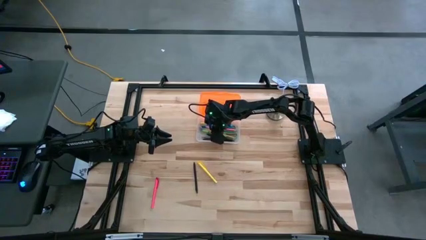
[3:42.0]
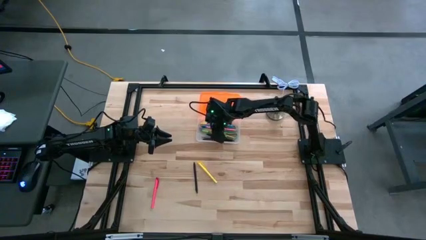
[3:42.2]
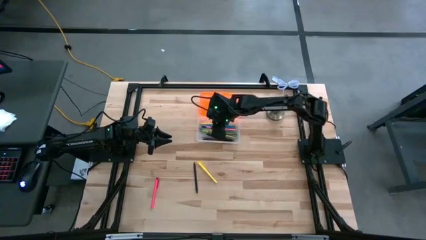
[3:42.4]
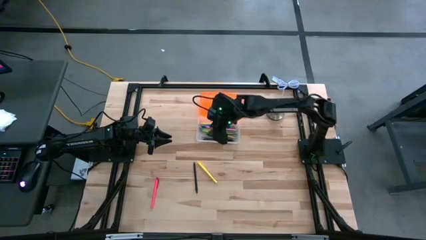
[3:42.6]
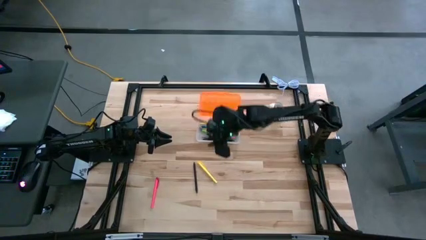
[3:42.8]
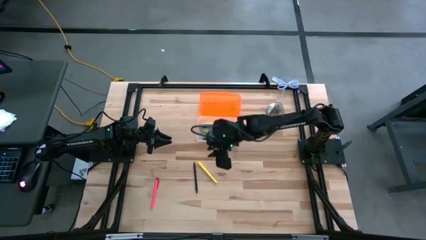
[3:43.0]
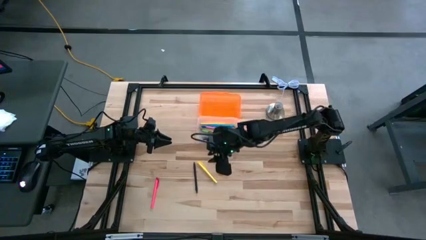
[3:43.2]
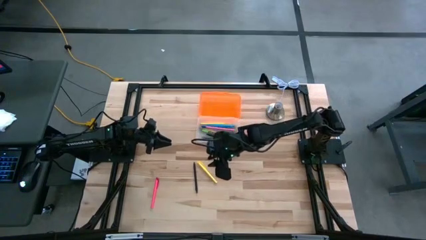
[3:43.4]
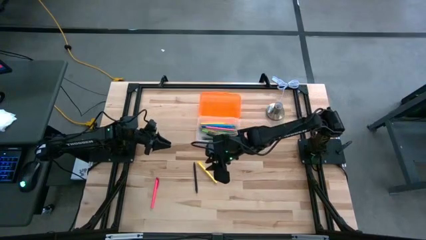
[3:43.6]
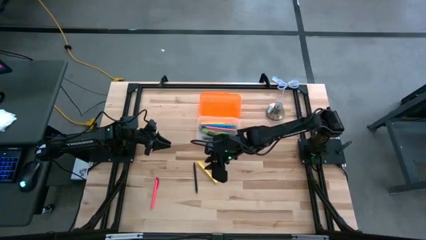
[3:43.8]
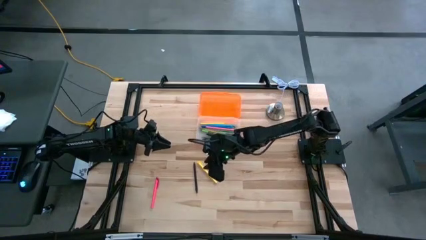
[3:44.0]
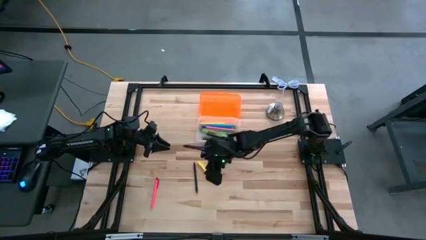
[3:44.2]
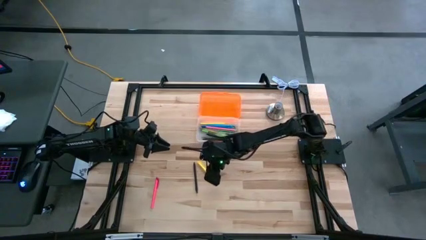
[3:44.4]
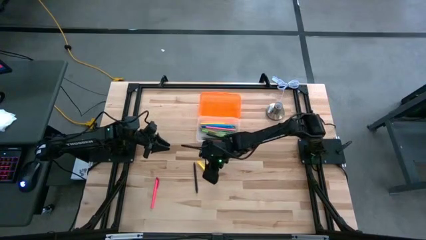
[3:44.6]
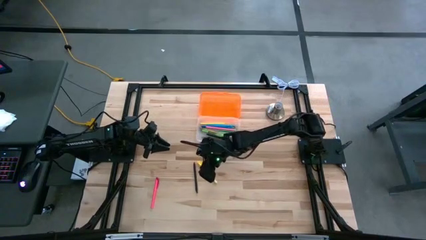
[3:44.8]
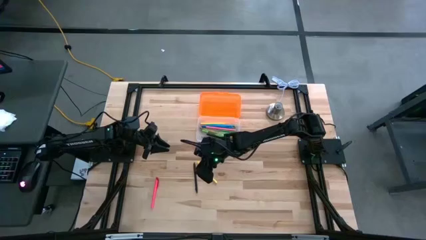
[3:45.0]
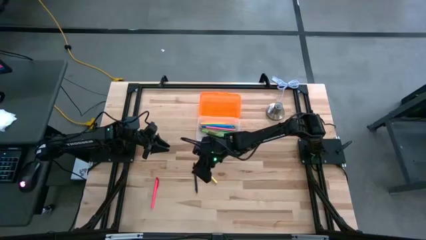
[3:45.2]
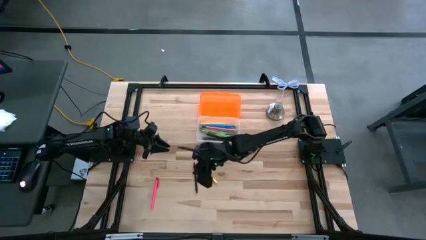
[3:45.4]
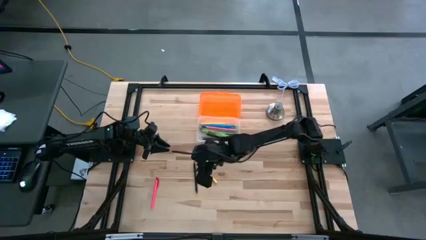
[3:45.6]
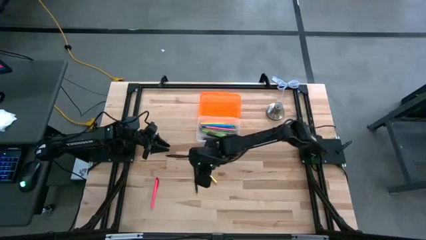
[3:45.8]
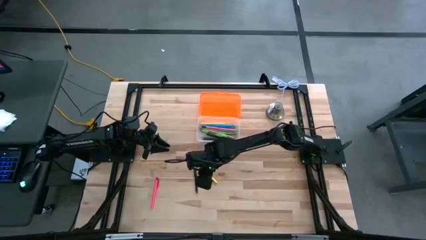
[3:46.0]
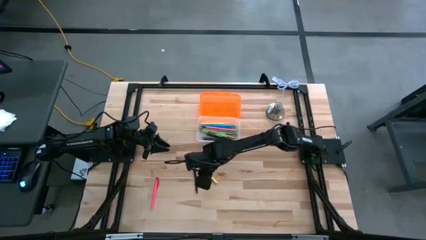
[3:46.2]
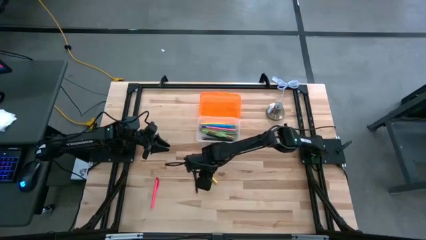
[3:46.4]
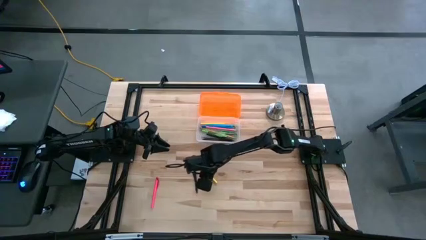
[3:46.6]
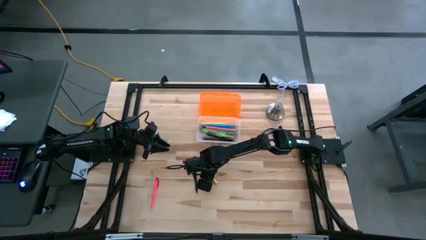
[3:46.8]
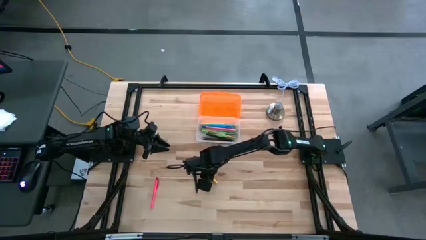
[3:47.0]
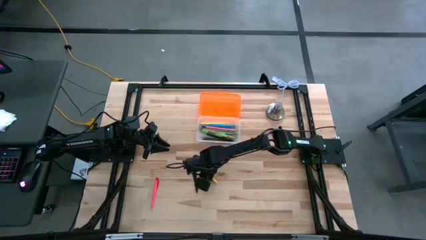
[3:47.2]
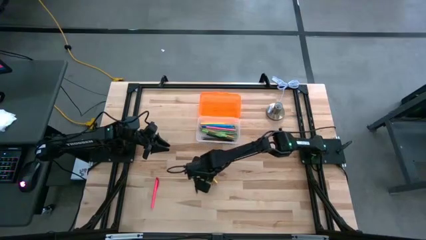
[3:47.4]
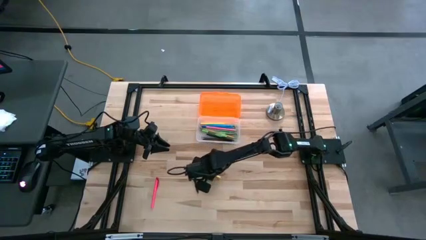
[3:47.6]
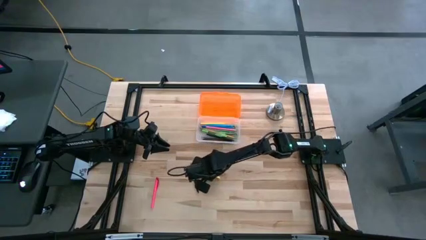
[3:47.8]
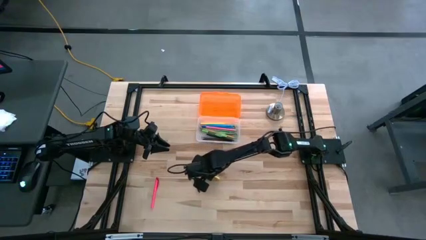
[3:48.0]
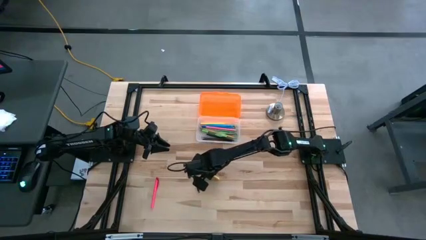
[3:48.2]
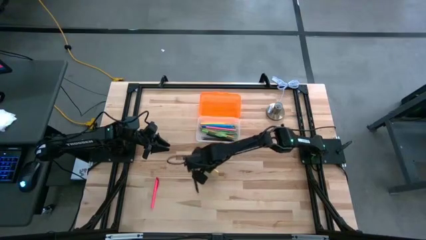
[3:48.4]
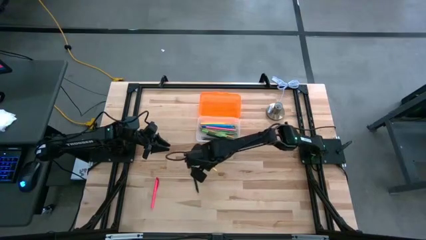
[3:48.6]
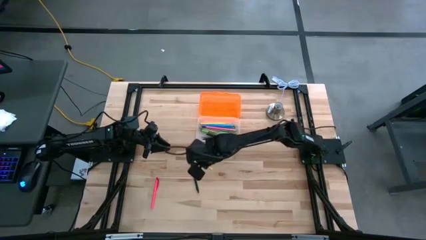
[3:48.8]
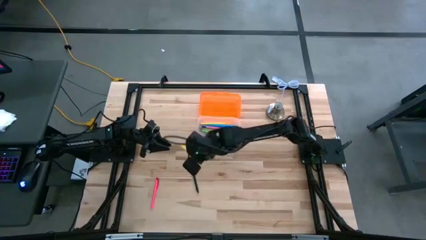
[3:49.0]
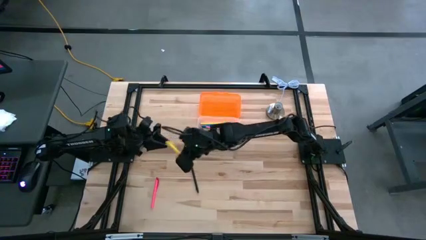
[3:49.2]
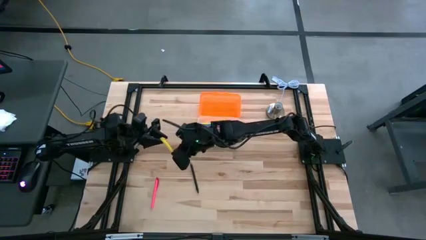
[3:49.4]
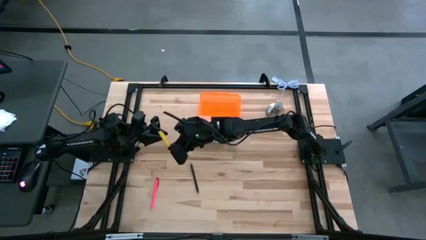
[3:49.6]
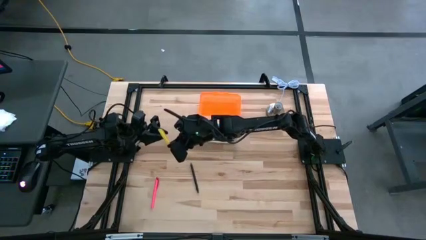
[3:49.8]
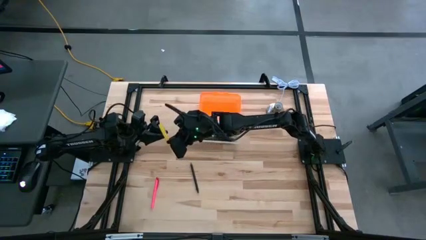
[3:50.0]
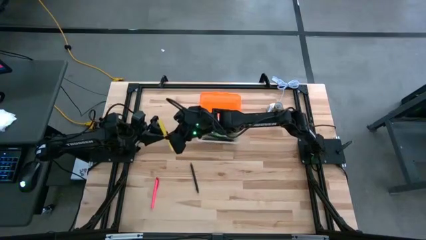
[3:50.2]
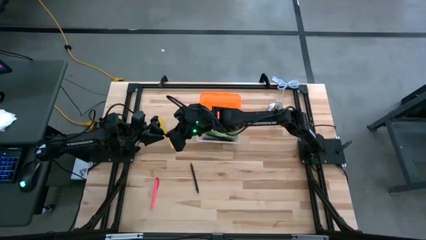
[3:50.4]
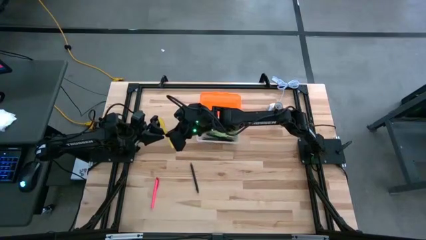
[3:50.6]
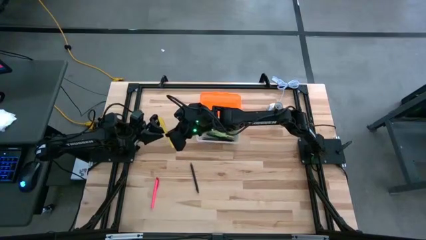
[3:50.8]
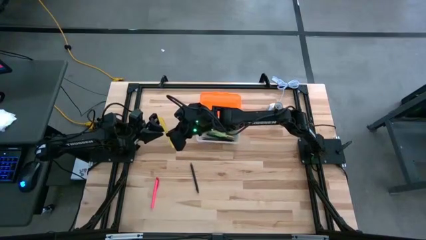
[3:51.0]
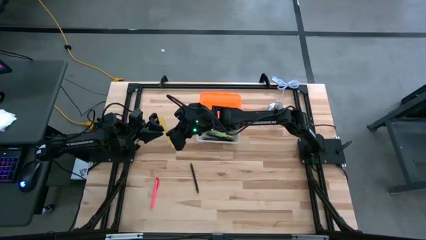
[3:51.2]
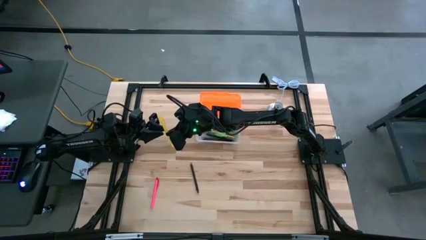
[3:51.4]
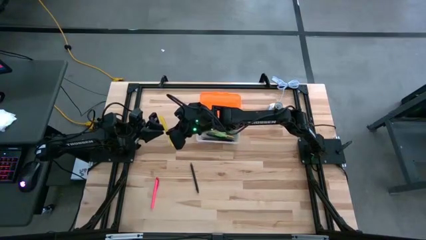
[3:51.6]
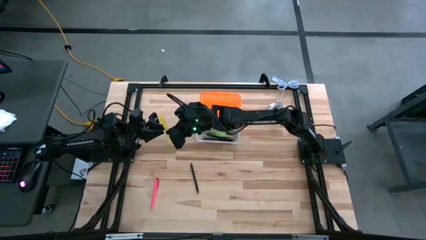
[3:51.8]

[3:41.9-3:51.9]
Task: Pick & place school supplies into a supply box
Put the yellow pen into the orange supply box

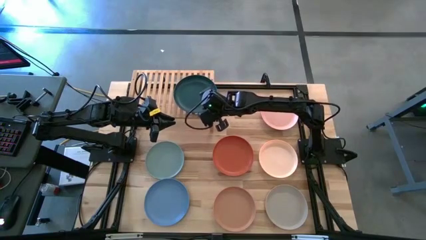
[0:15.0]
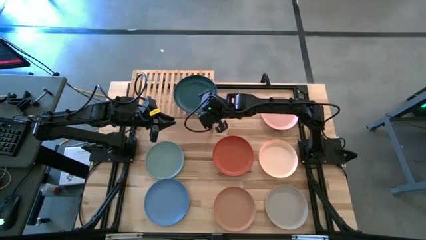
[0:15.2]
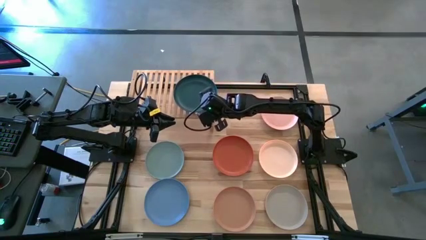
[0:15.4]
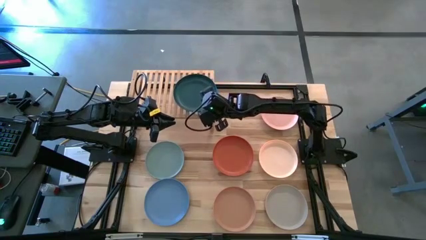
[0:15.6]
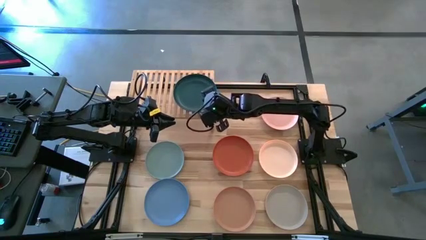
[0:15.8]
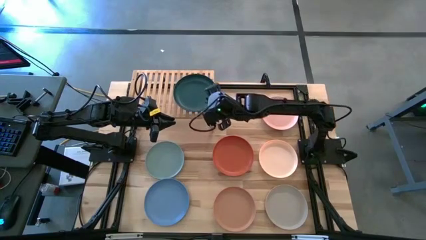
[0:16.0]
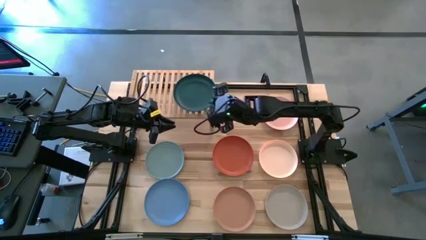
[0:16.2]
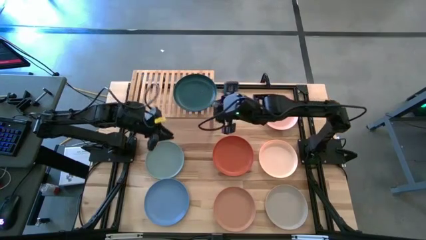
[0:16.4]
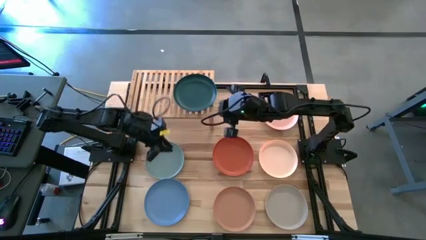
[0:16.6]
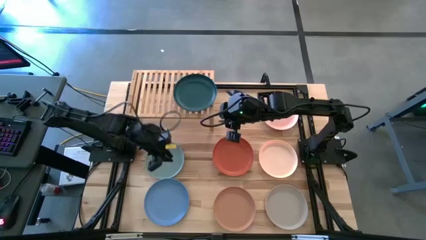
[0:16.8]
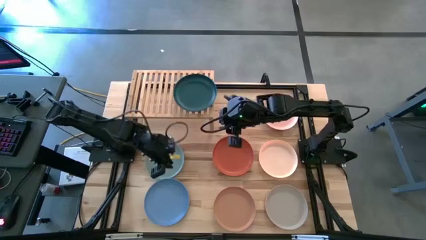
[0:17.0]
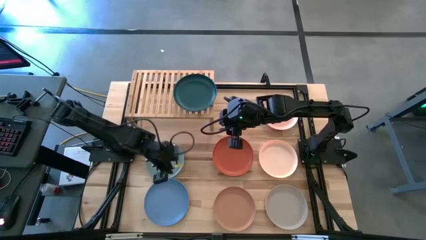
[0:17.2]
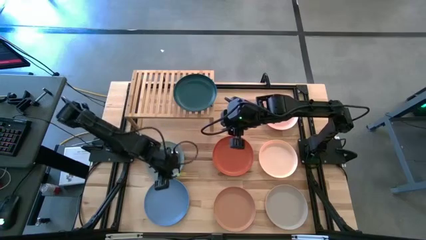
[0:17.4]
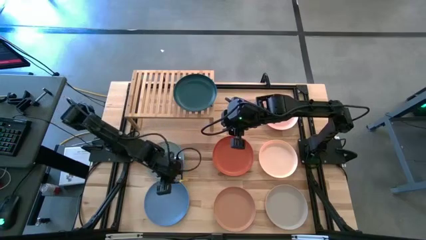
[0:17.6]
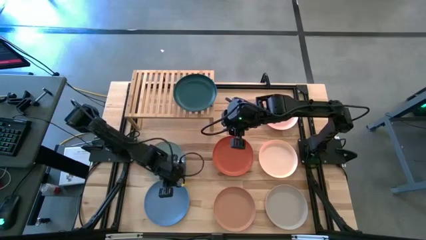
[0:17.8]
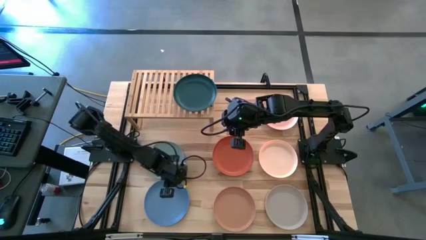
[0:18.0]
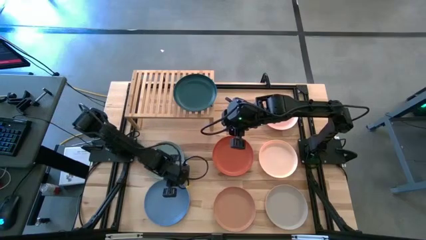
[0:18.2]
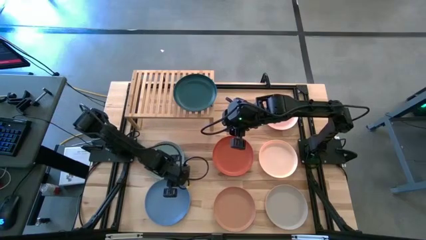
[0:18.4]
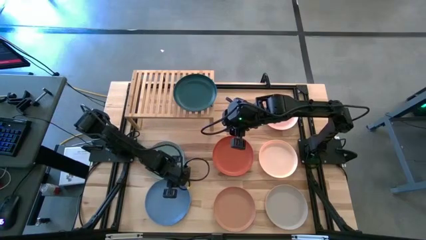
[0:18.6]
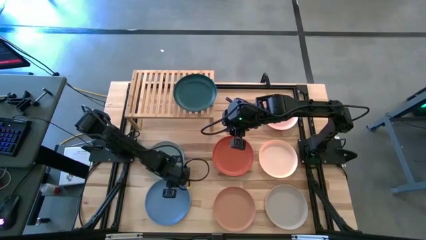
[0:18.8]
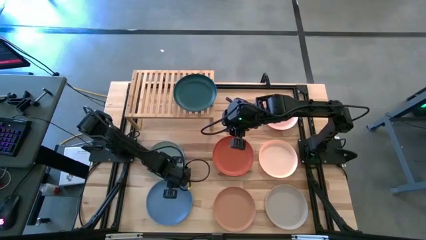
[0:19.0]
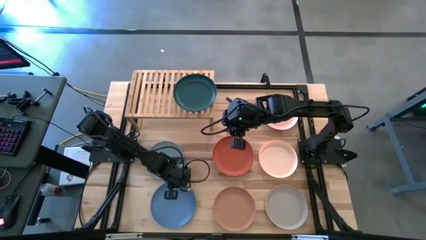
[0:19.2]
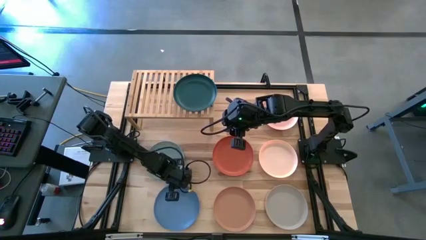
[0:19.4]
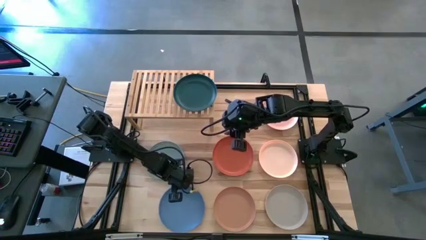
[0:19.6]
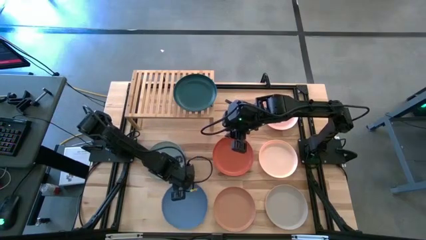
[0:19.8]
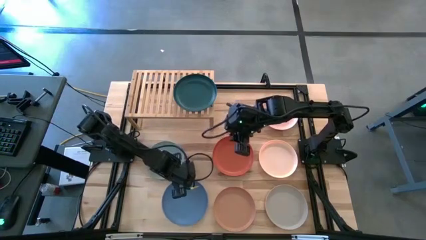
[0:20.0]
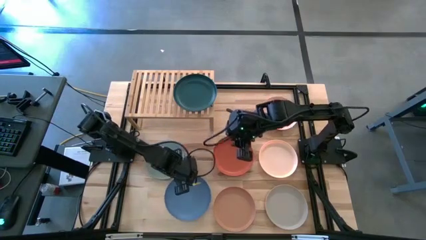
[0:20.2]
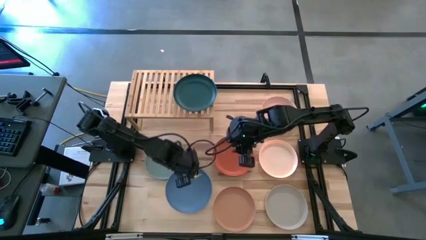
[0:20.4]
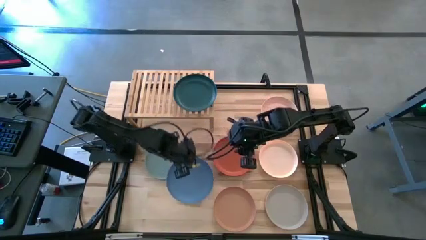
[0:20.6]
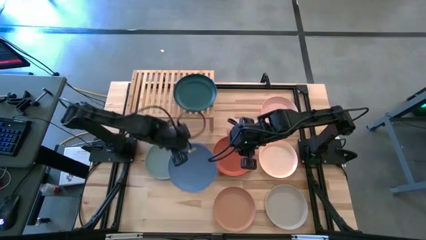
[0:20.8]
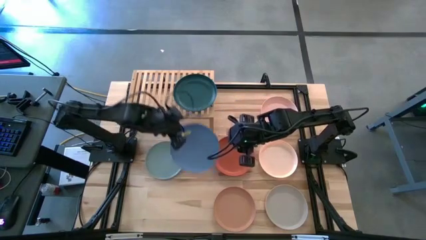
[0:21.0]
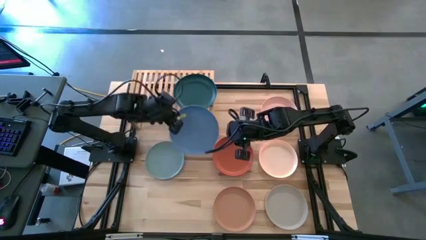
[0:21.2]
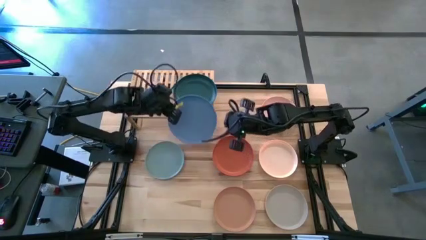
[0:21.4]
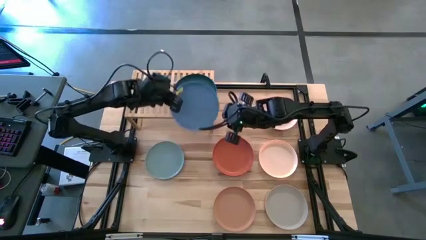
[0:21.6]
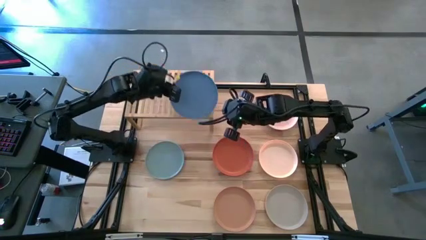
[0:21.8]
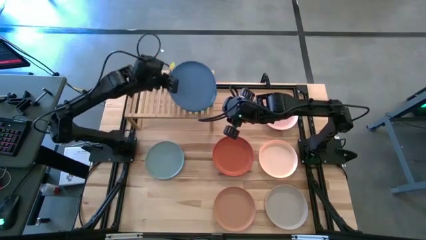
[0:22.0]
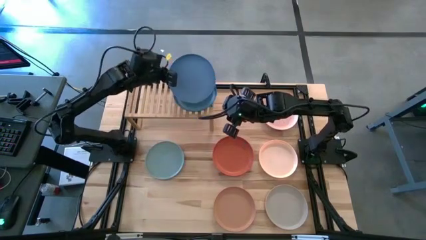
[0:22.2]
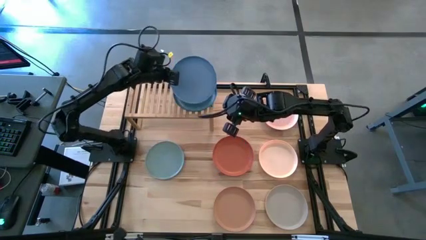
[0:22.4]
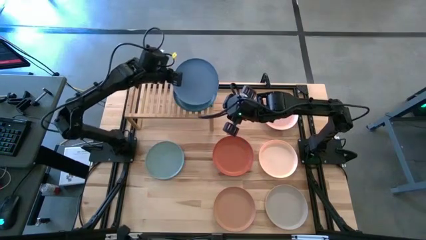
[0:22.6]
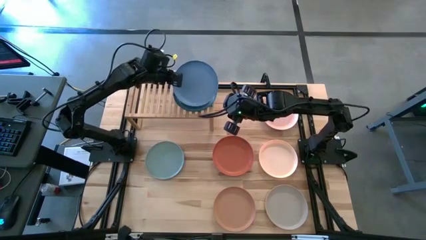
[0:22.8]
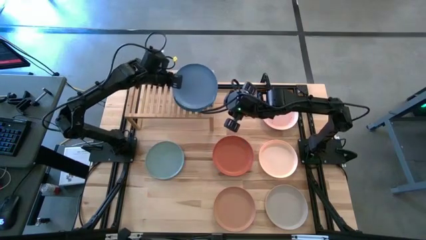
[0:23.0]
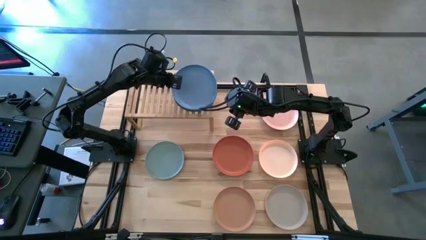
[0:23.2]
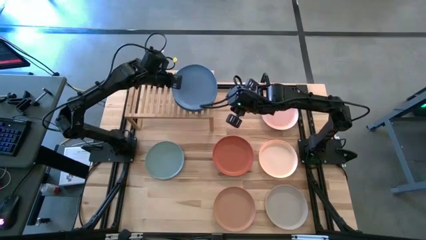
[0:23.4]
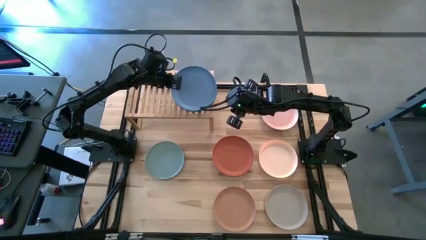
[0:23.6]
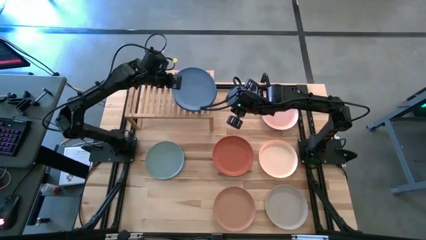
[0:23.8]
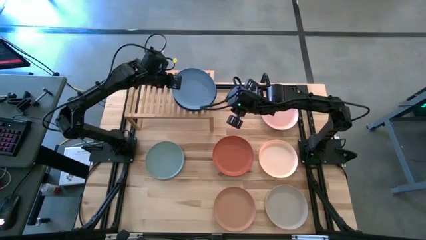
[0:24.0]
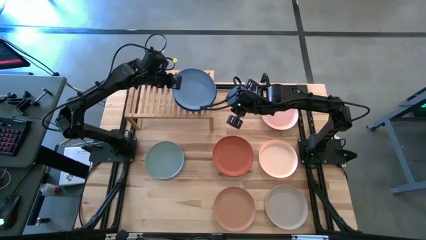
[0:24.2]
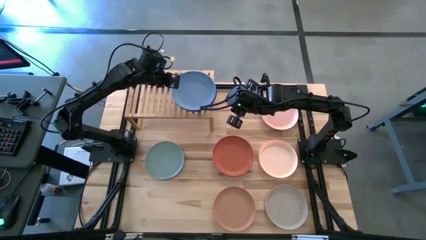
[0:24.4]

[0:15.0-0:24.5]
Task: Place and stack plates onto a shelf
Stack the blue plate on top of the dark green plate on the shelf
